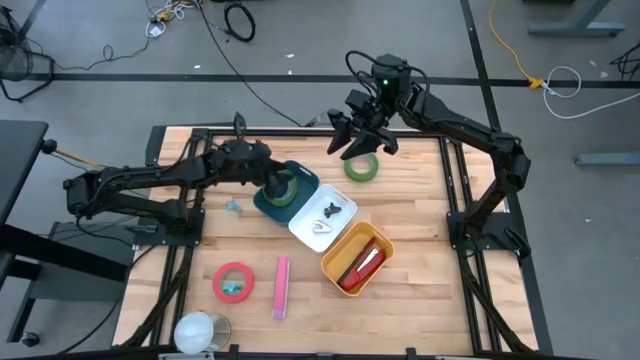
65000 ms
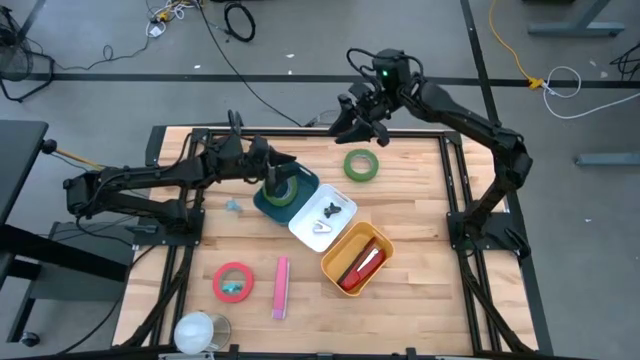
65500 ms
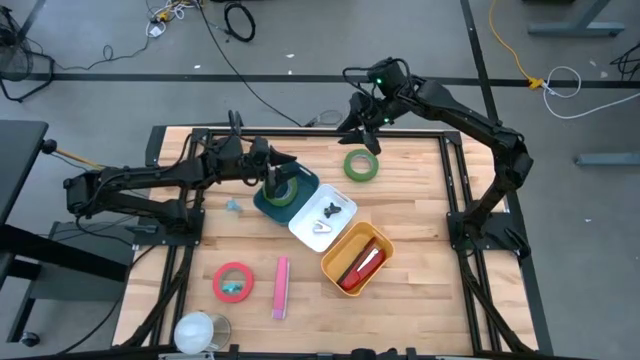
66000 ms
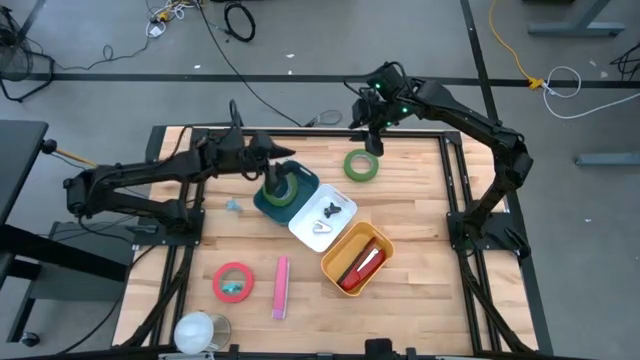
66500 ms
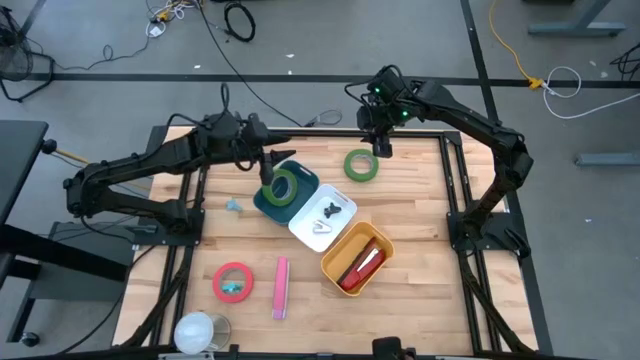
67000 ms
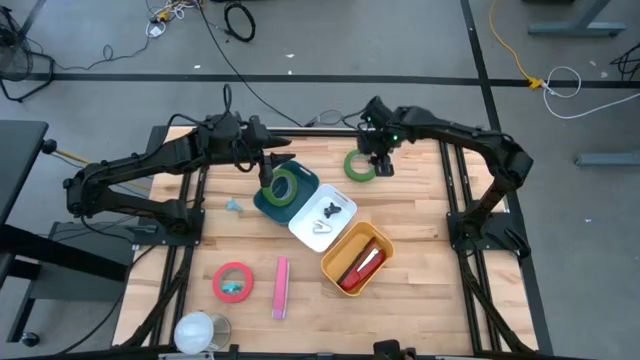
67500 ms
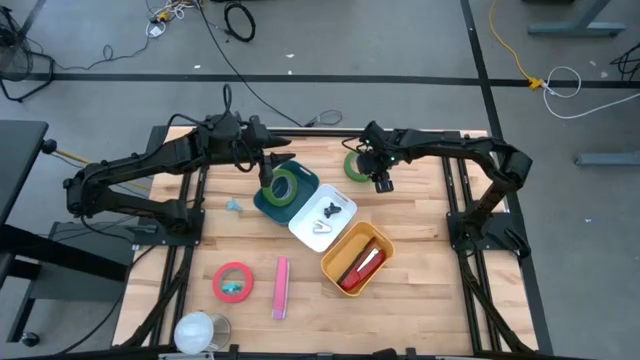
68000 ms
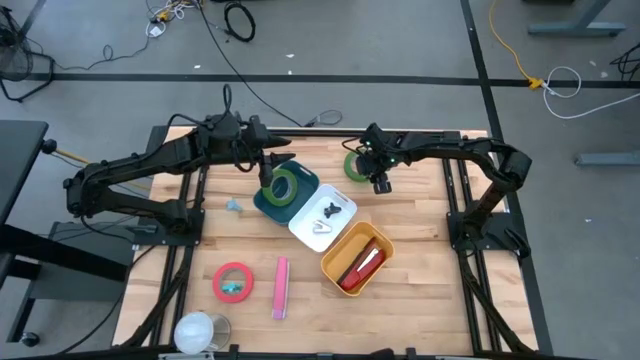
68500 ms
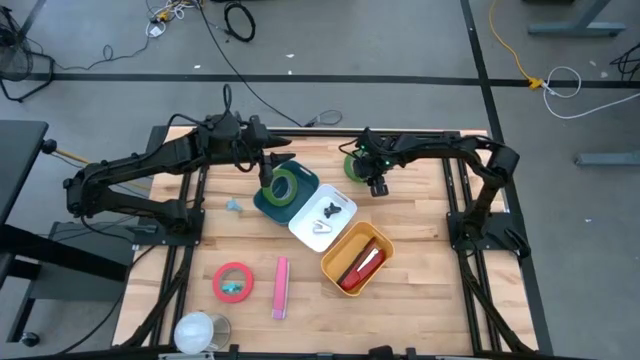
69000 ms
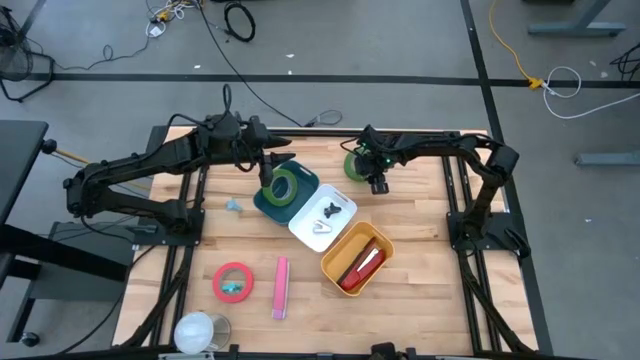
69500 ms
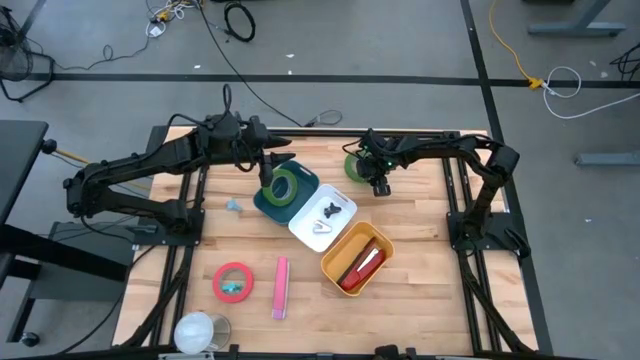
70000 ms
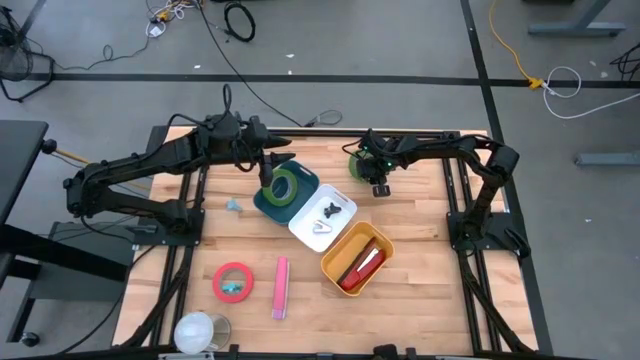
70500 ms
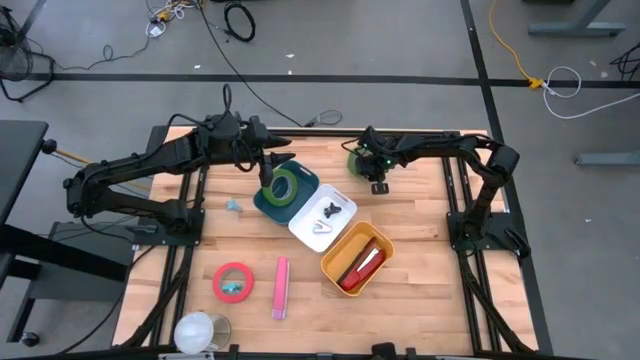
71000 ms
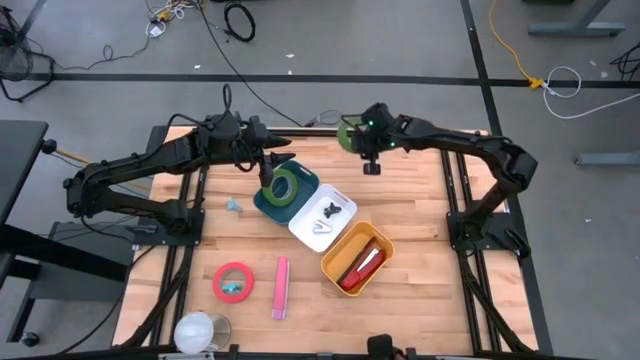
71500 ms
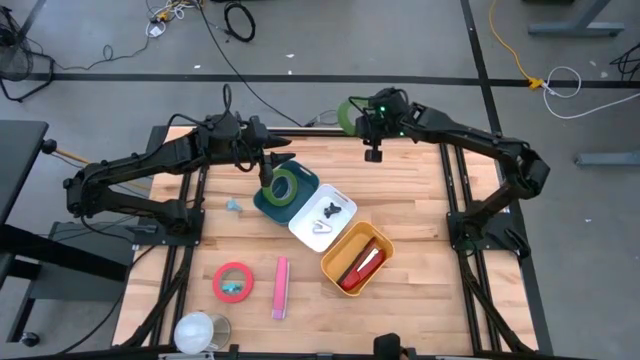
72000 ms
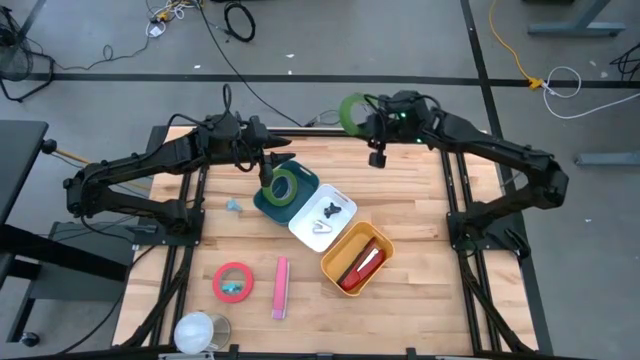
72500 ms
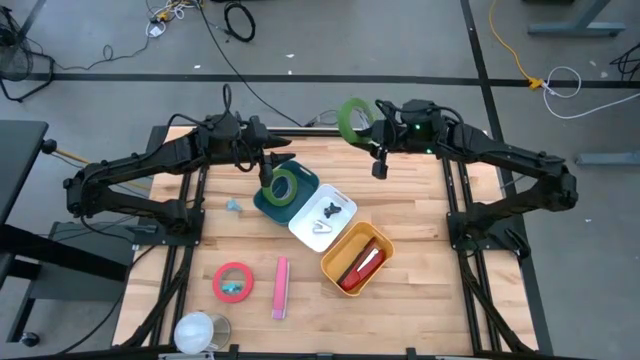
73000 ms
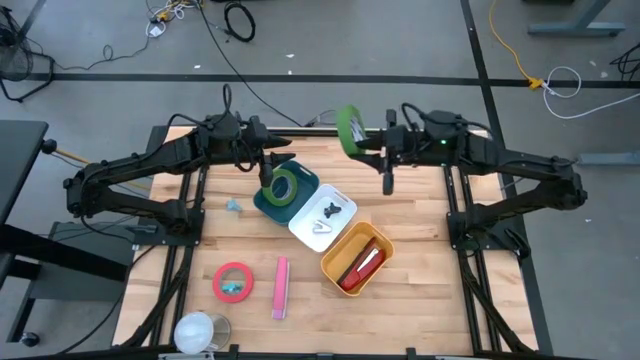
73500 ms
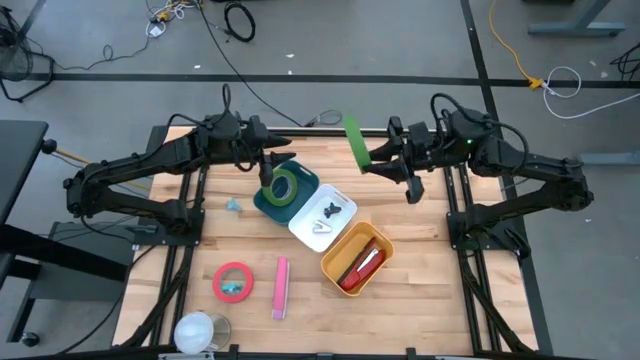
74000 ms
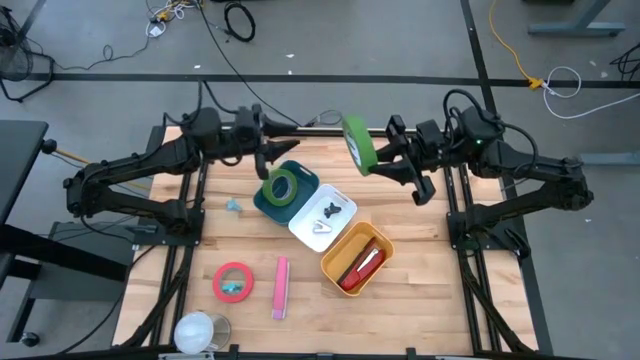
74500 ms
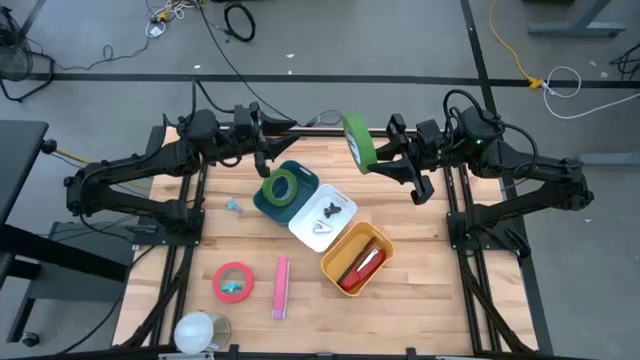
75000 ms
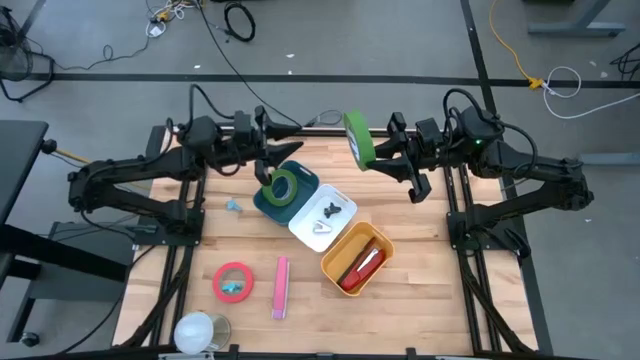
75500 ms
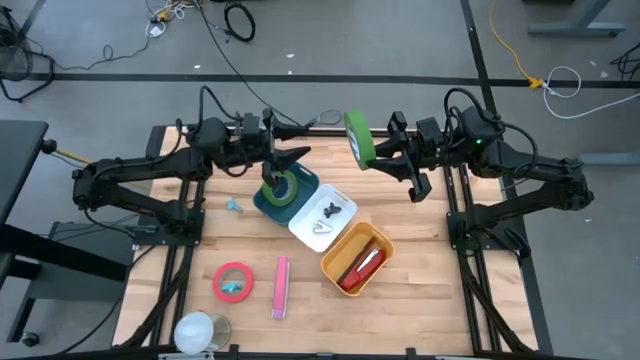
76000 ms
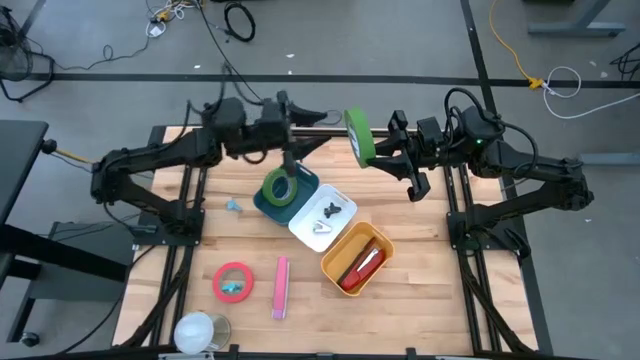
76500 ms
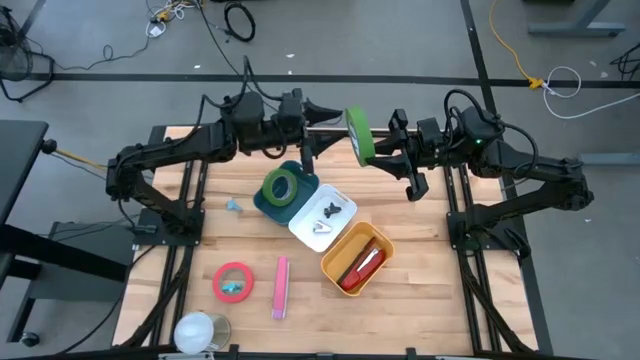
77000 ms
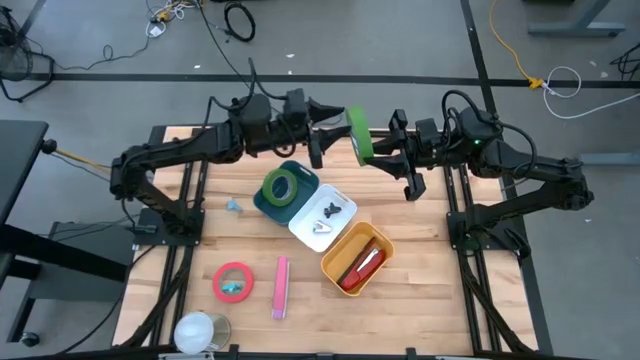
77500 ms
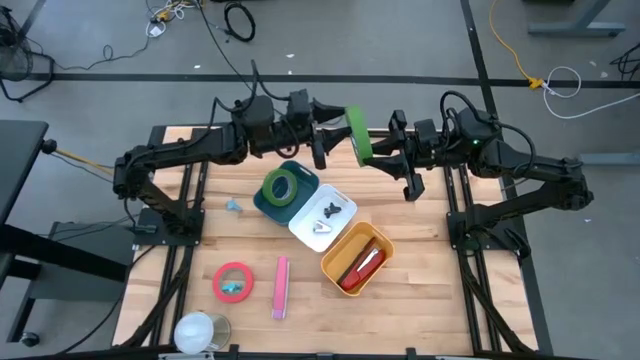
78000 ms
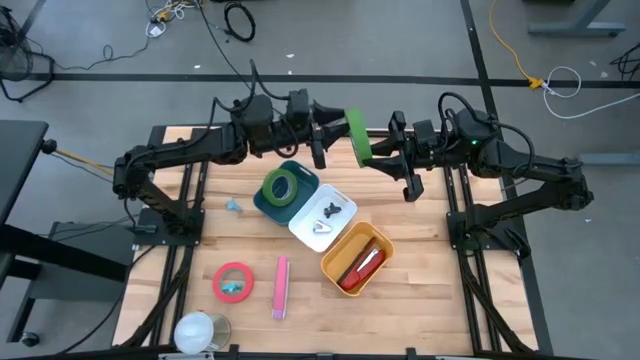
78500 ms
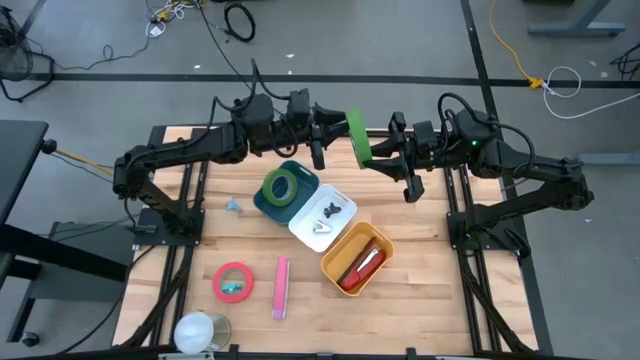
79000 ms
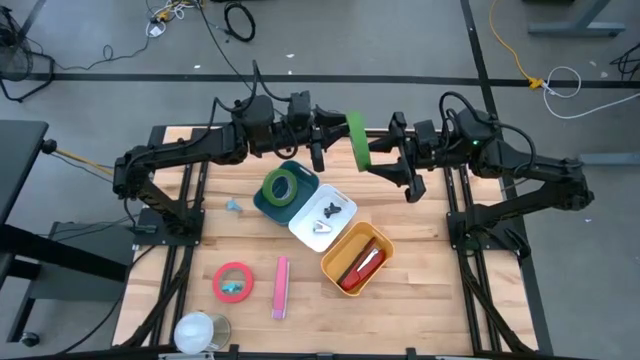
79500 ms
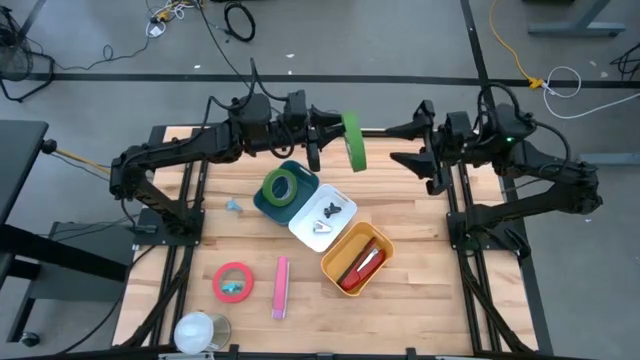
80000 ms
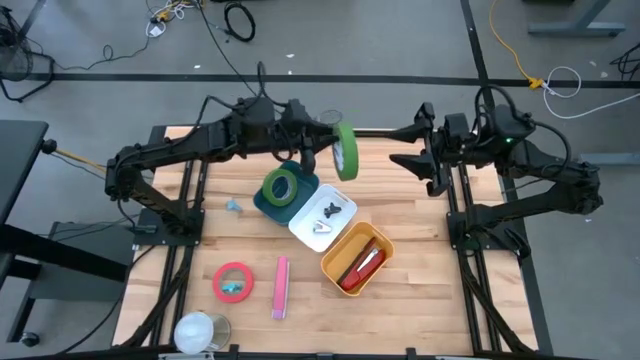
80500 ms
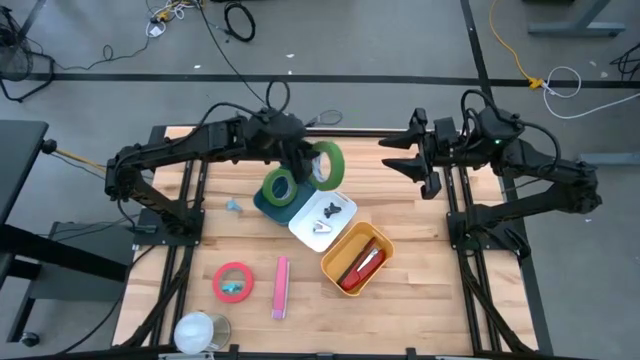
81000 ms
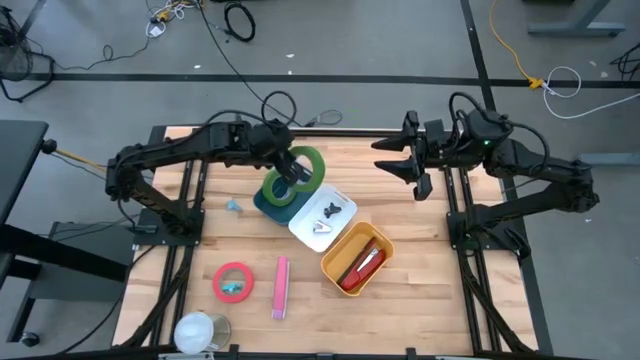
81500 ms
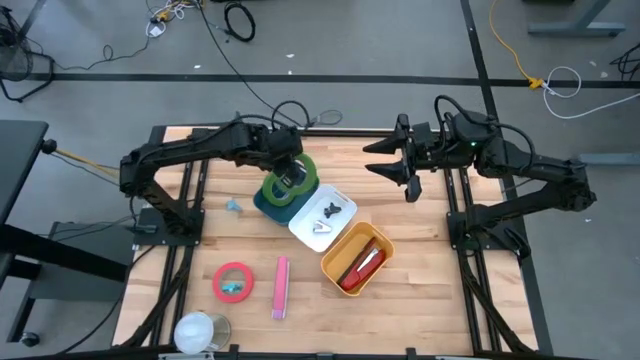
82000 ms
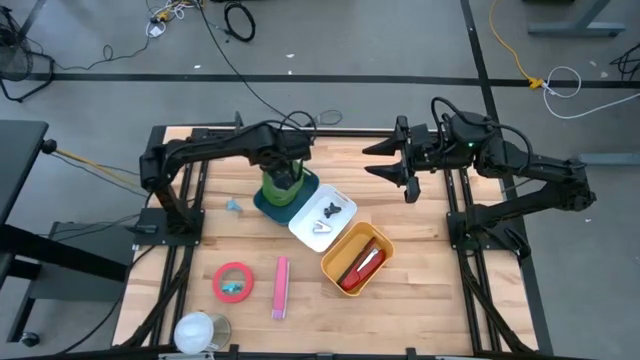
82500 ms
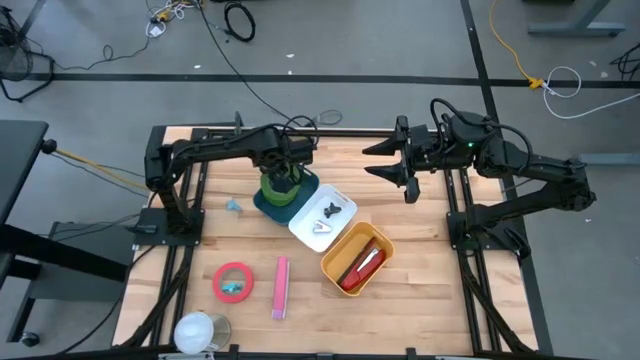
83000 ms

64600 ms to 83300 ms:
Task: Pick and place Stapler, Stapler remover, tape
Put the green tape into the blue bin

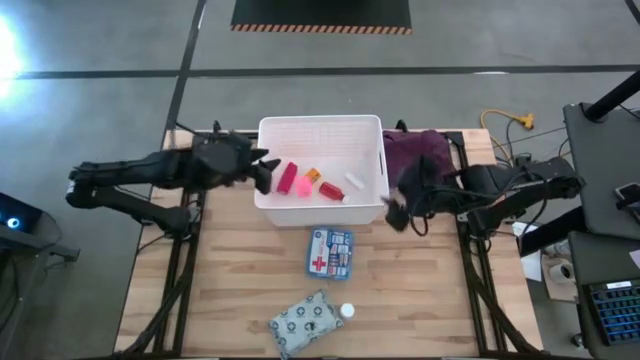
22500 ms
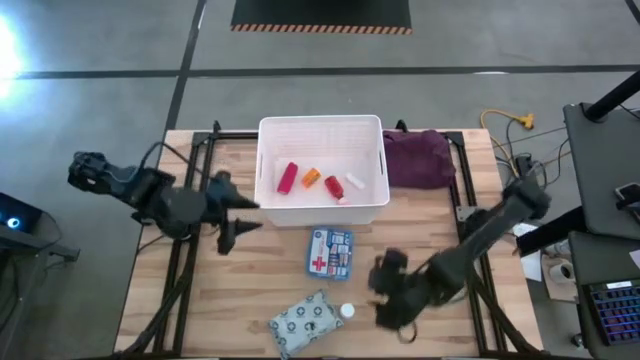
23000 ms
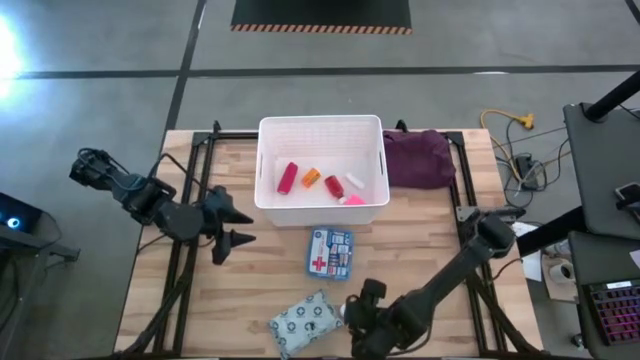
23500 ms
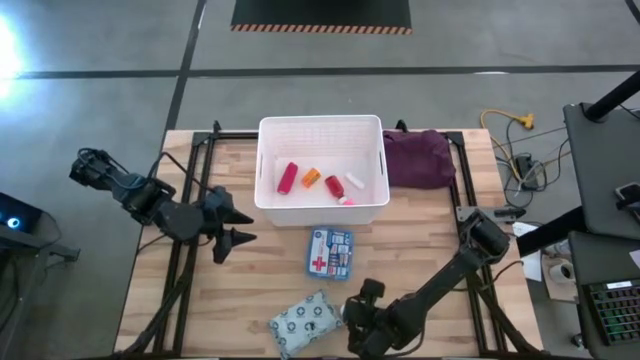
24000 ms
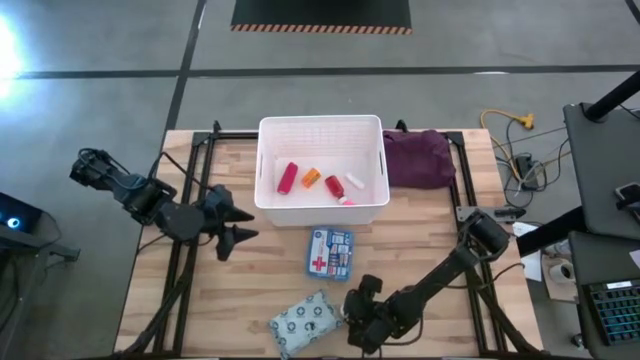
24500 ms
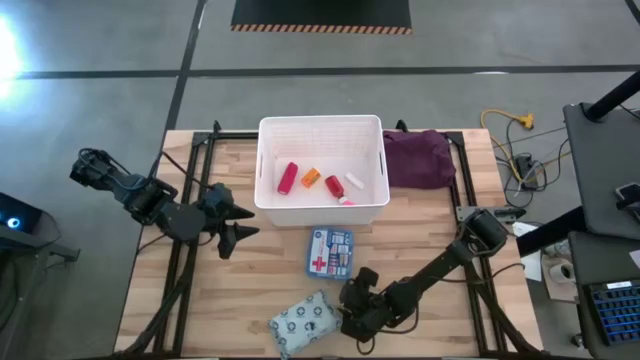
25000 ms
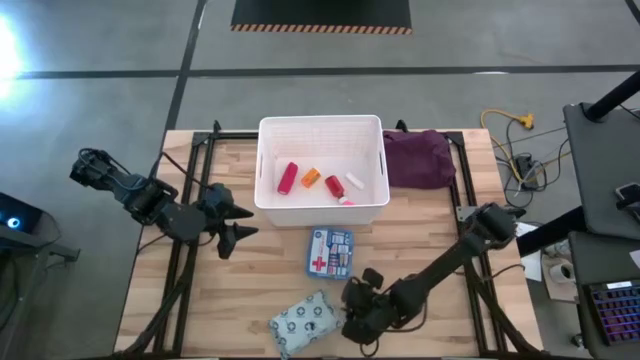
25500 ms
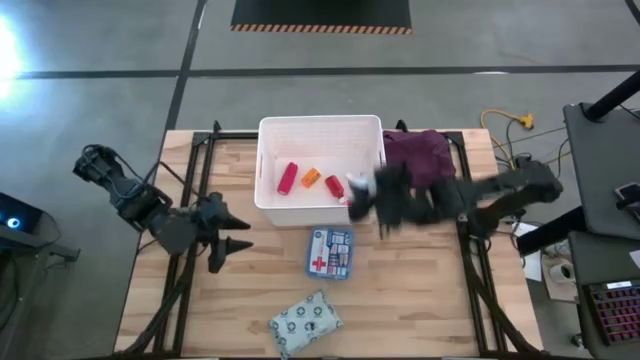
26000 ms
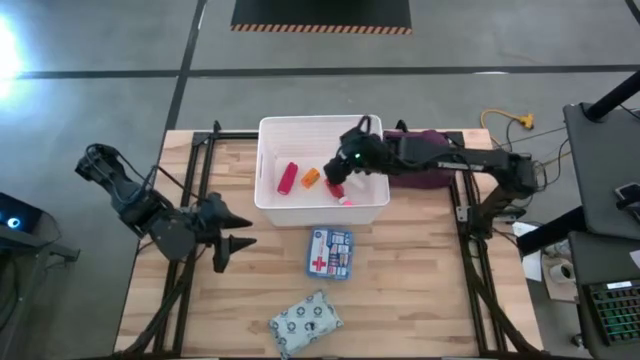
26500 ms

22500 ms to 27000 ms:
Task: Pick & place medical supplies in basket/bin
Put the white bottle into the white bin
